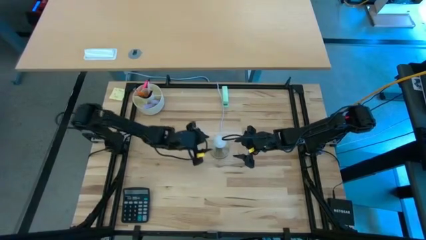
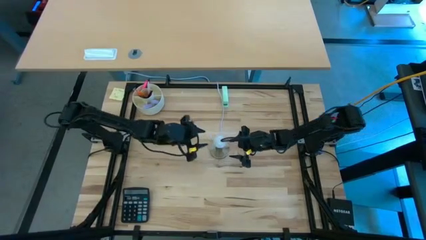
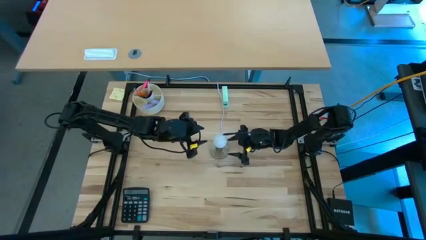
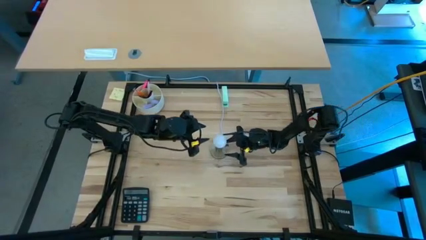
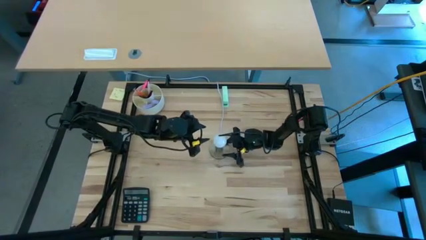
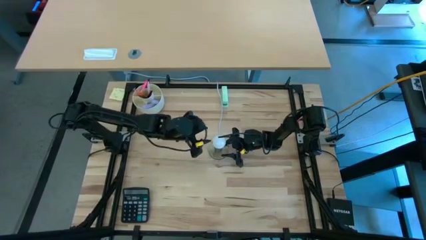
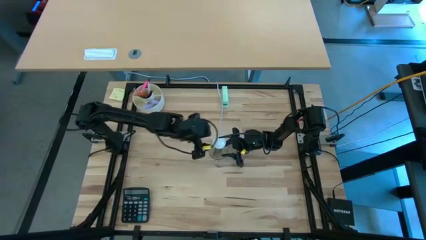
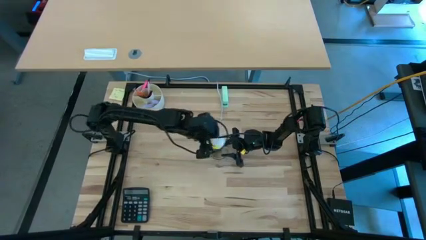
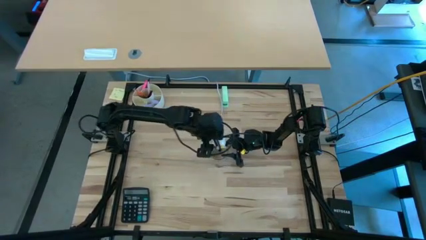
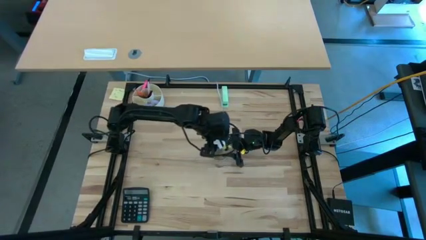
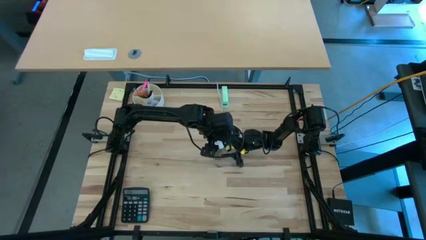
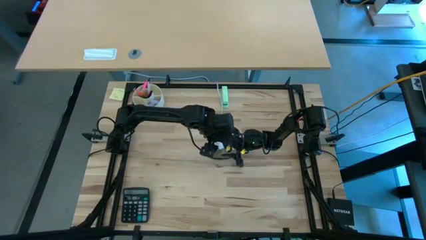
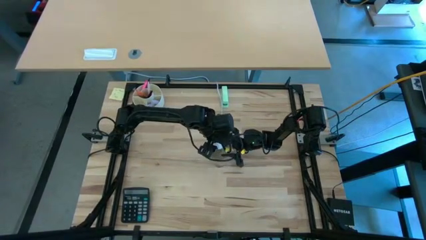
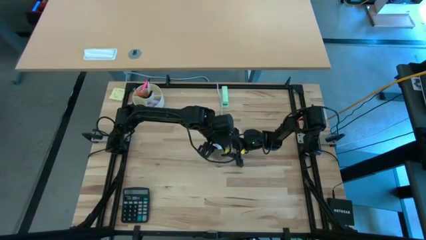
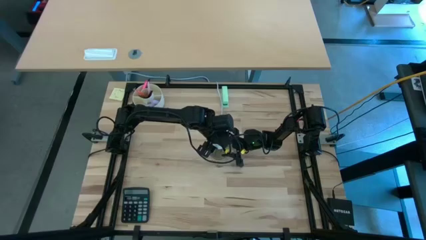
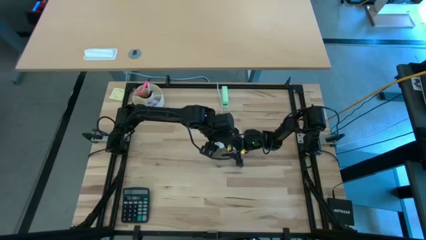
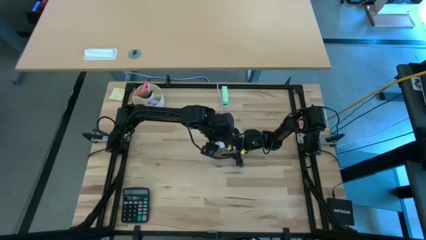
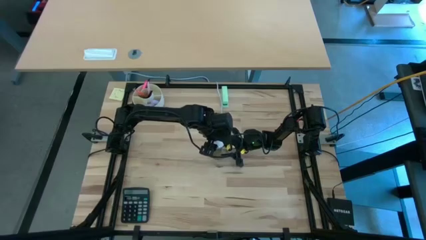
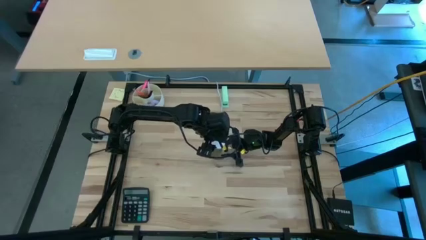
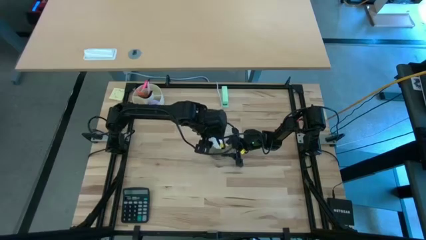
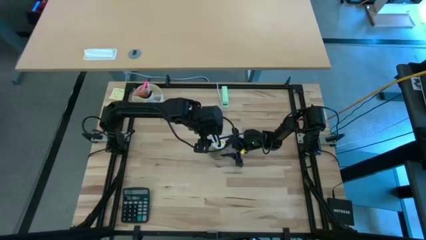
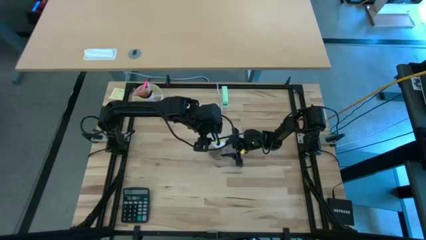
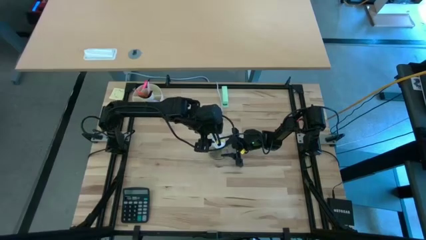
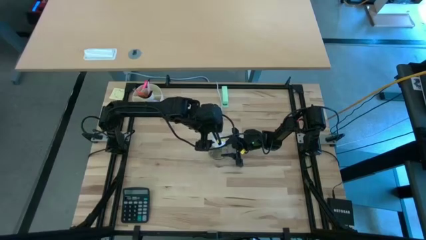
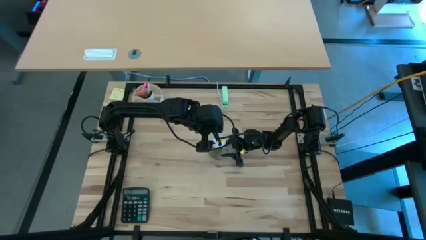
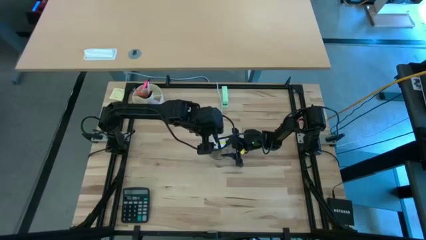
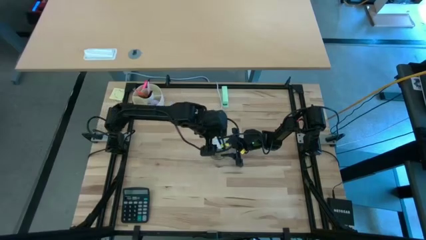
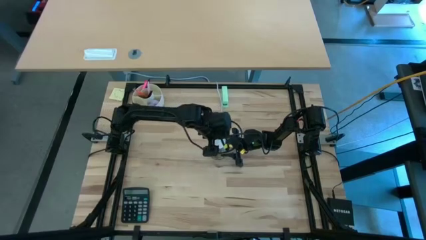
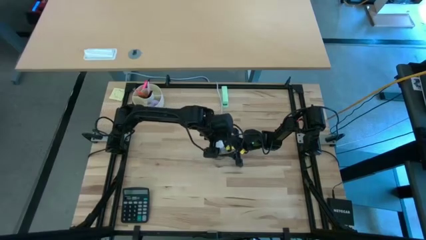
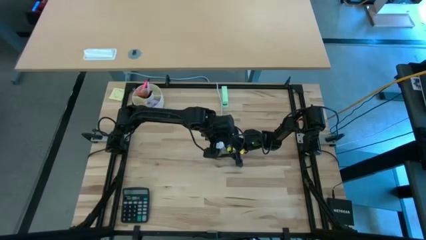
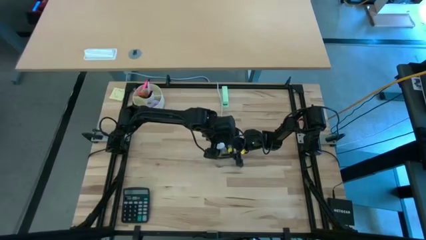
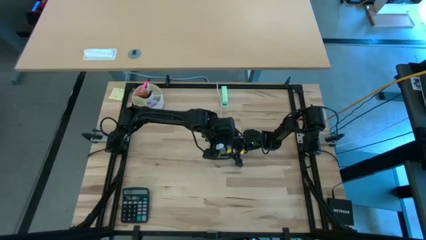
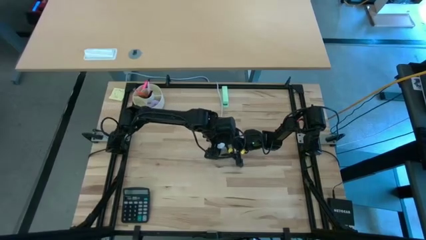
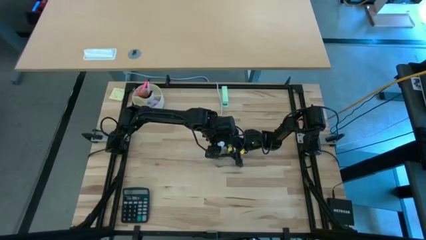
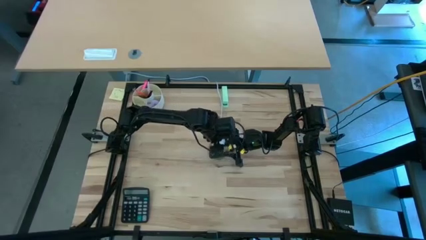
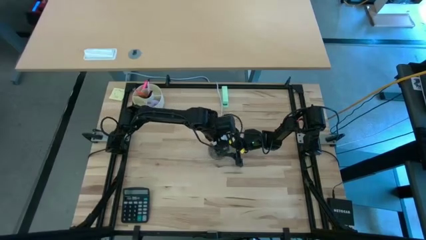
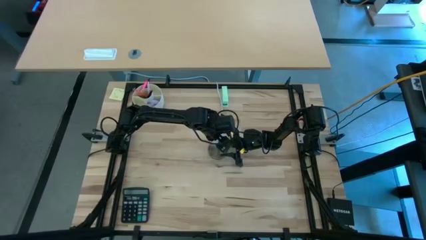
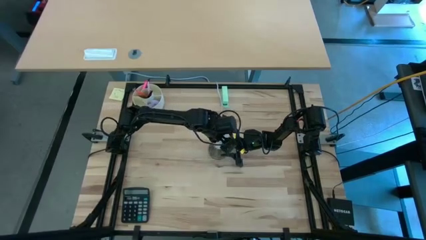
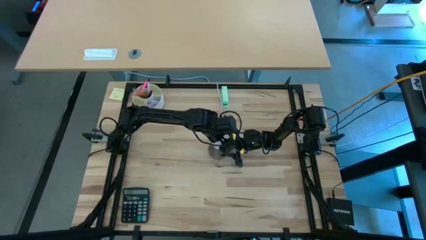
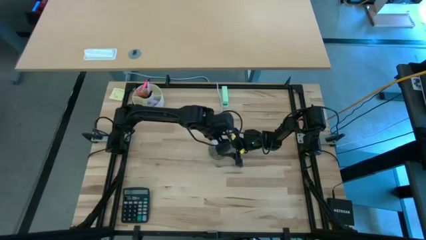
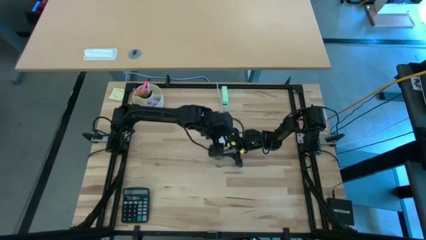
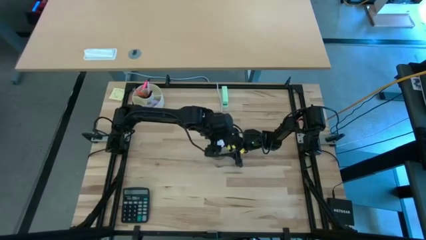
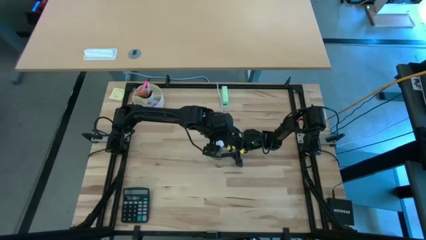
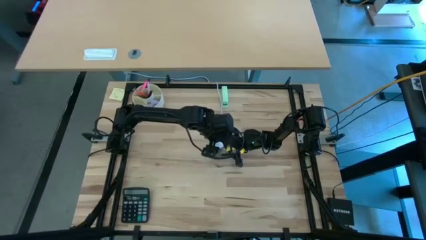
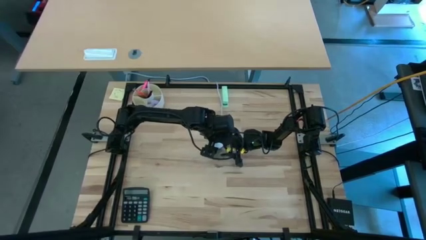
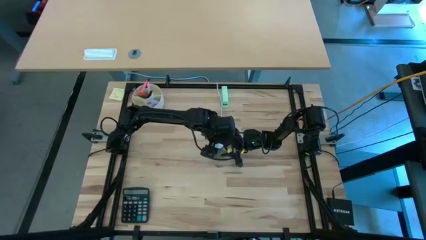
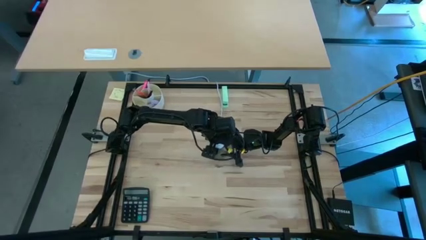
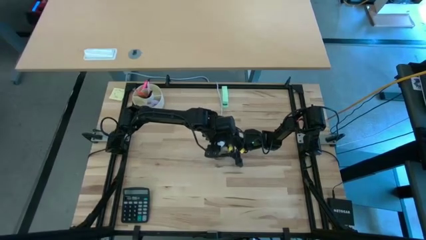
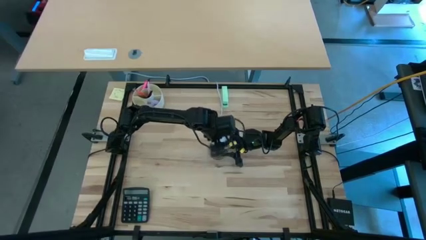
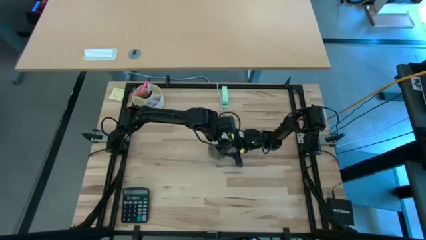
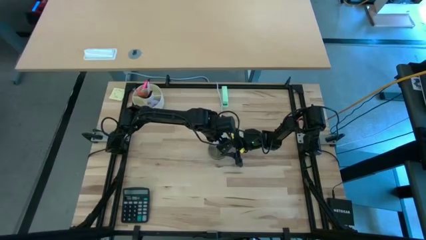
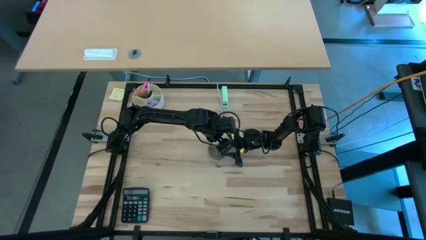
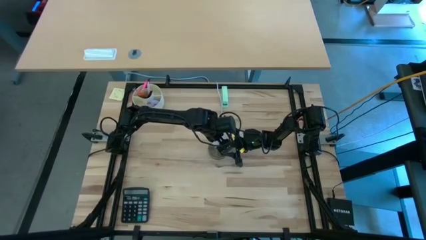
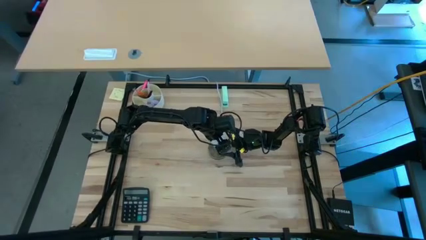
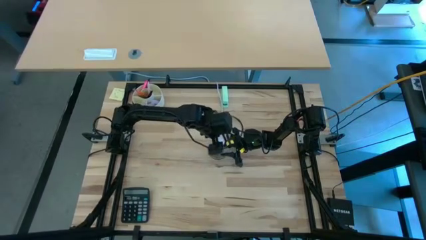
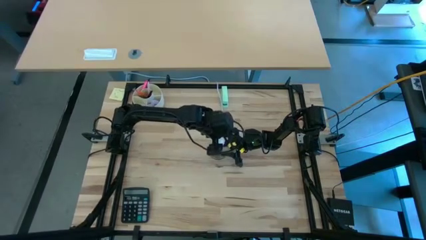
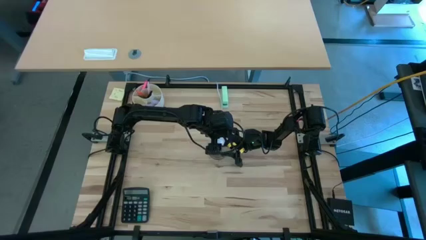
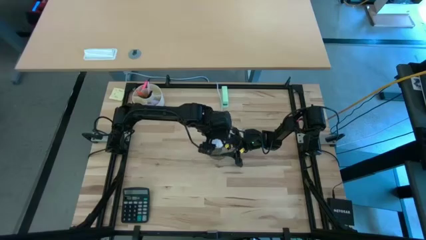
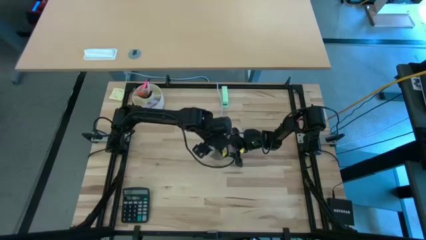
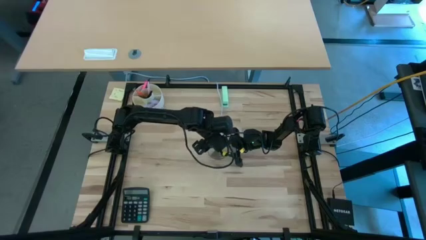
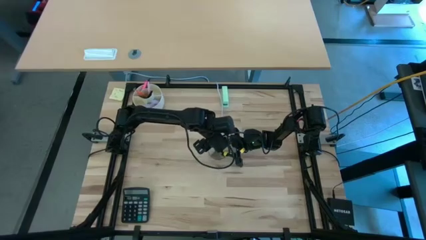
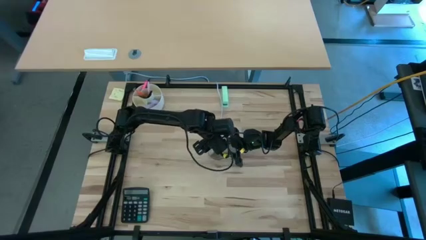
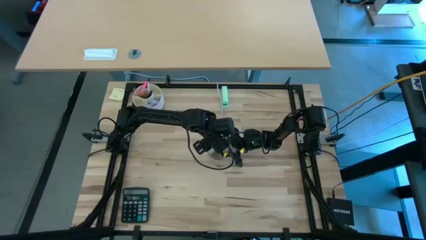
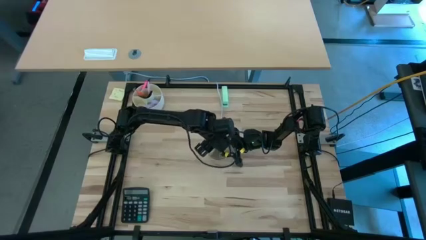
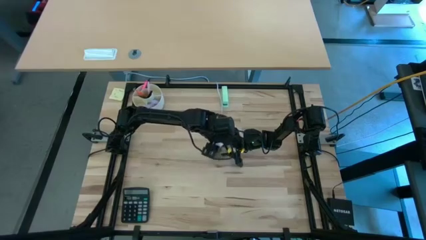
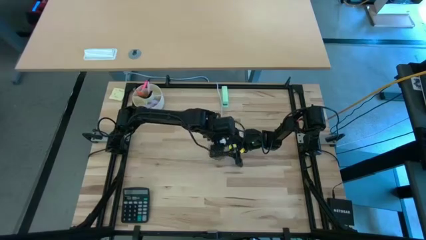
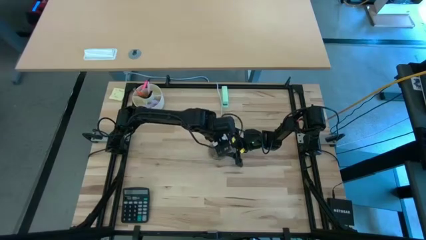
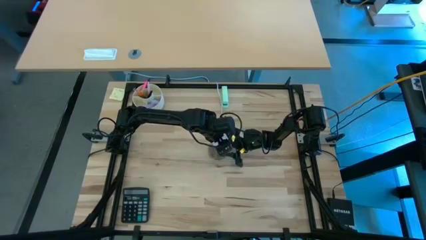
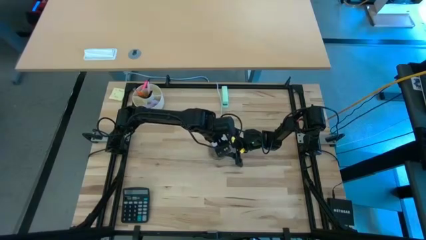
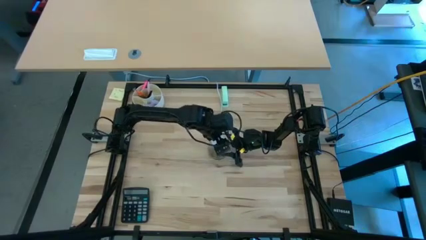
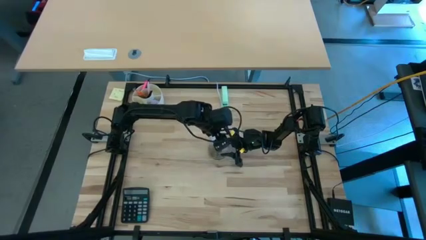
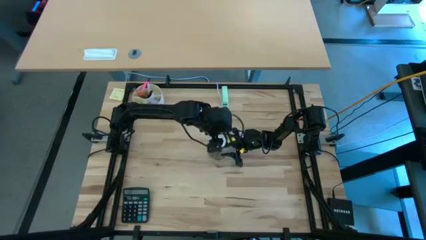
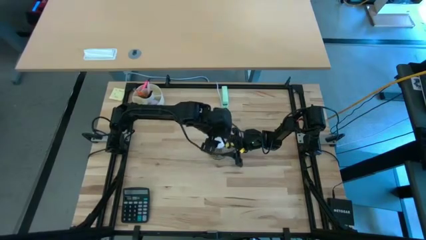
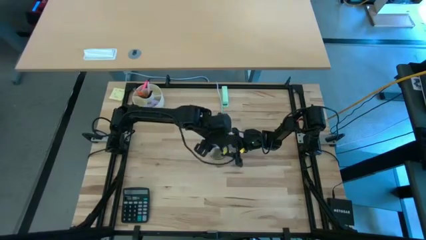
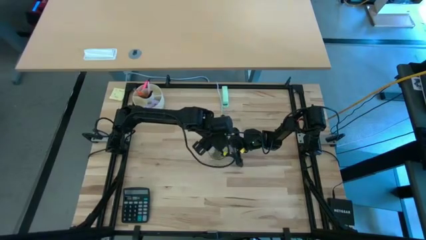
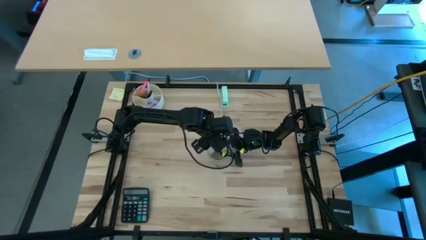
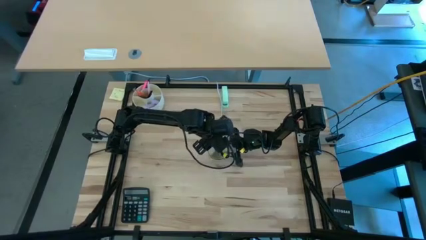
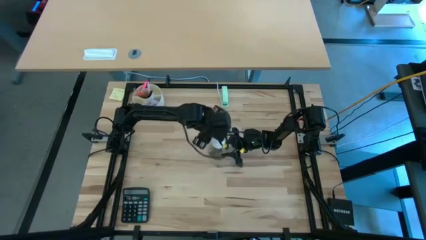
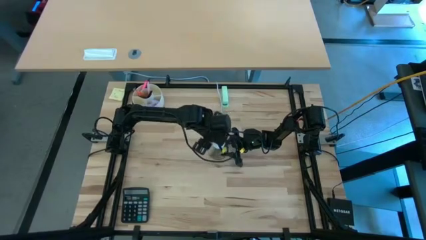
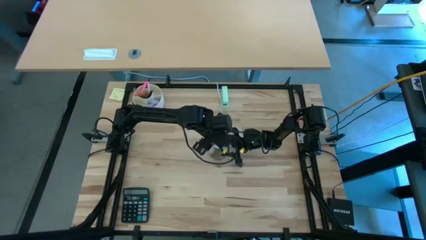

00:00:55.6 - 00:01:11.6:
Task: Screw lightbulb
Remove the lightbulb from the lamp
